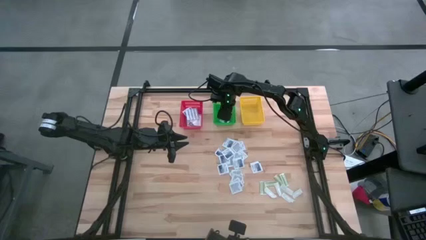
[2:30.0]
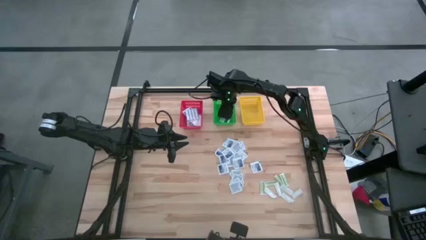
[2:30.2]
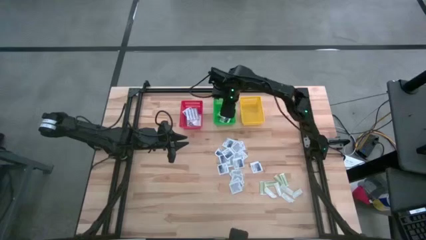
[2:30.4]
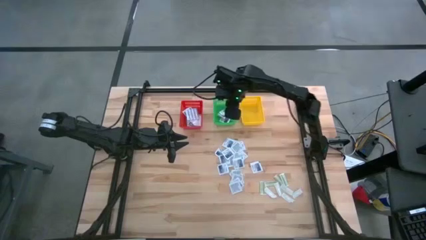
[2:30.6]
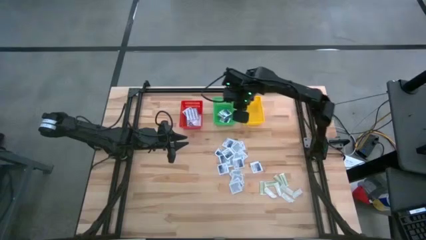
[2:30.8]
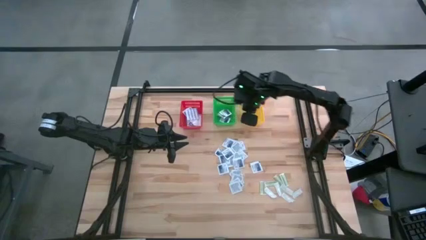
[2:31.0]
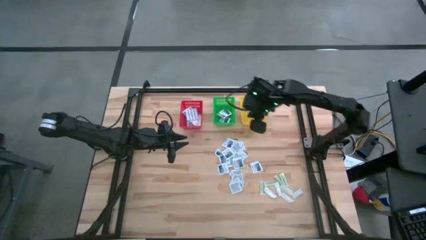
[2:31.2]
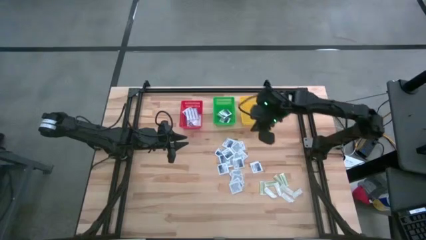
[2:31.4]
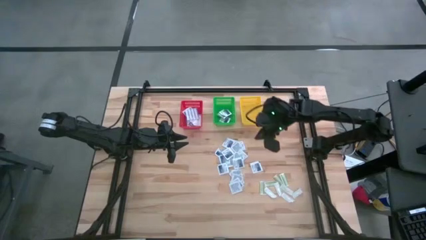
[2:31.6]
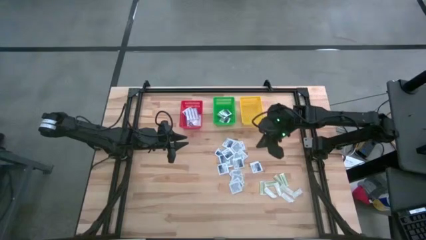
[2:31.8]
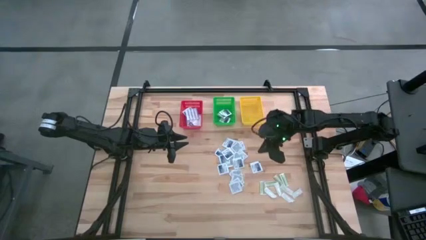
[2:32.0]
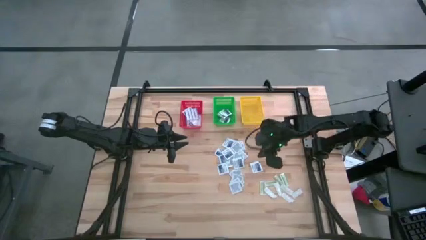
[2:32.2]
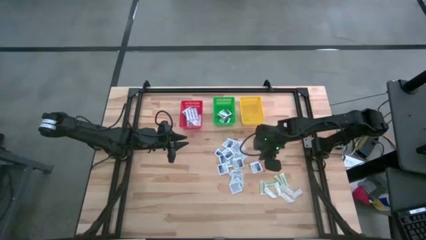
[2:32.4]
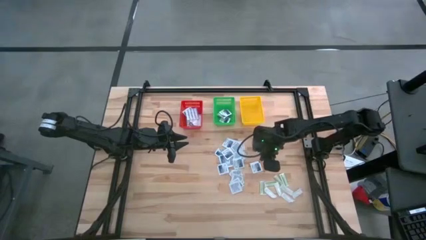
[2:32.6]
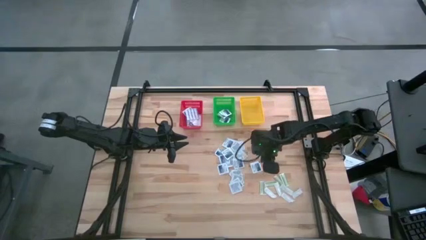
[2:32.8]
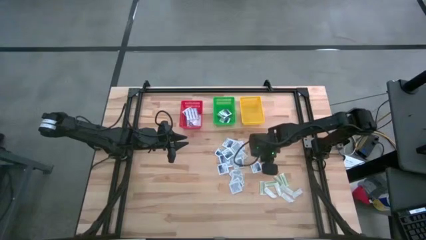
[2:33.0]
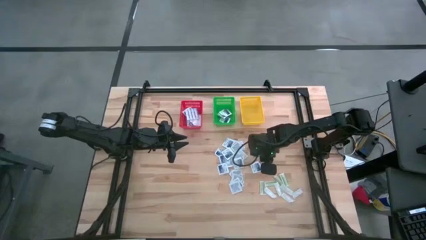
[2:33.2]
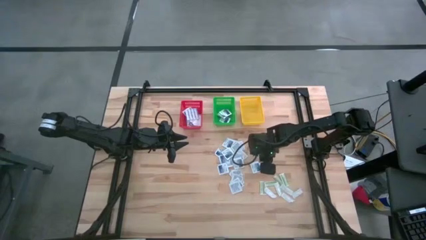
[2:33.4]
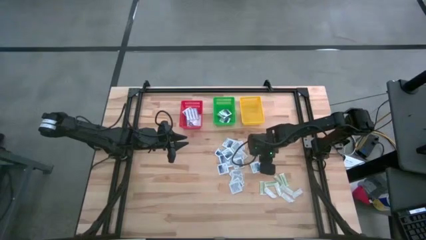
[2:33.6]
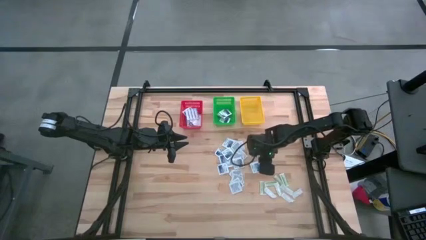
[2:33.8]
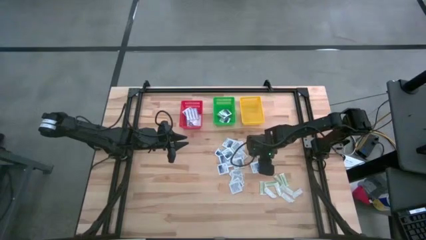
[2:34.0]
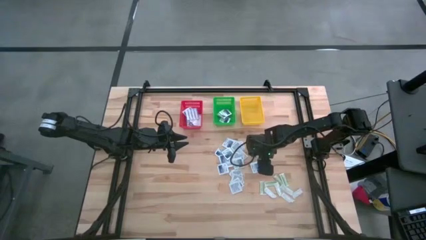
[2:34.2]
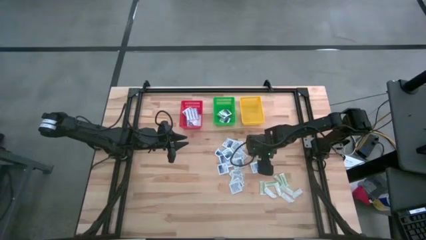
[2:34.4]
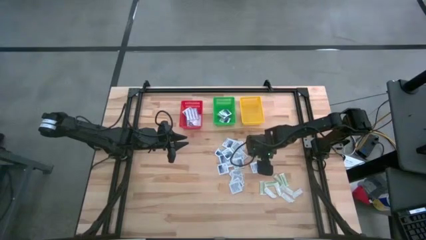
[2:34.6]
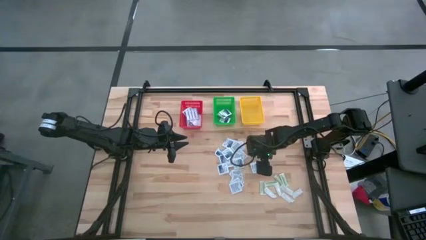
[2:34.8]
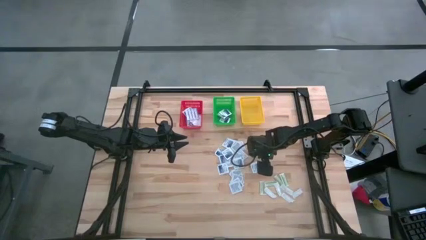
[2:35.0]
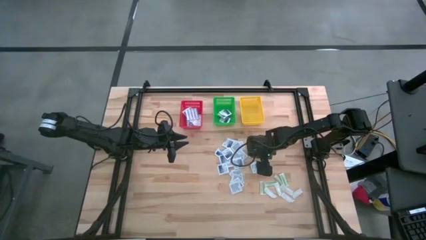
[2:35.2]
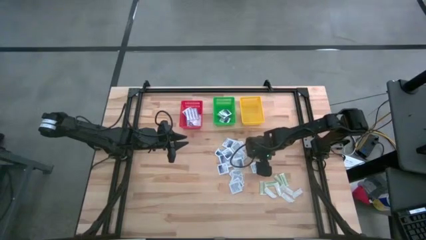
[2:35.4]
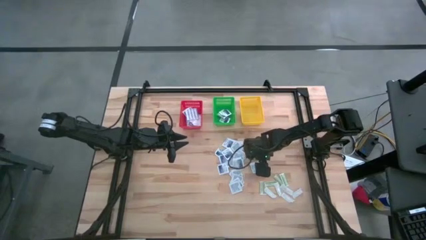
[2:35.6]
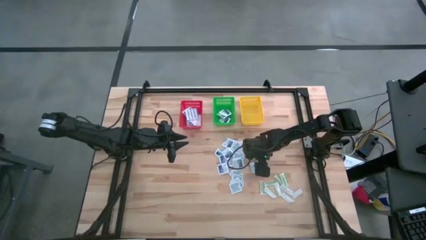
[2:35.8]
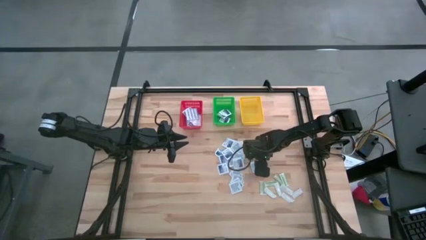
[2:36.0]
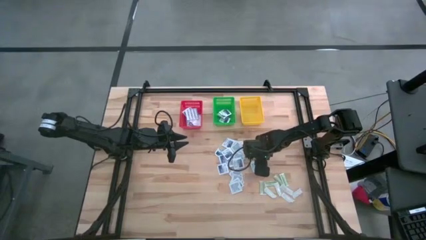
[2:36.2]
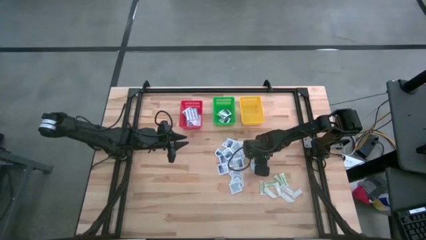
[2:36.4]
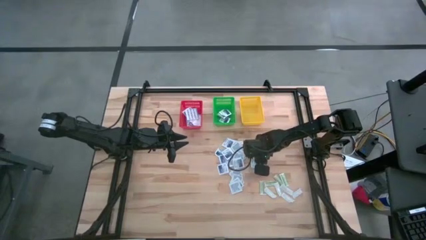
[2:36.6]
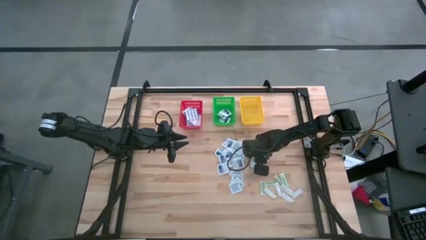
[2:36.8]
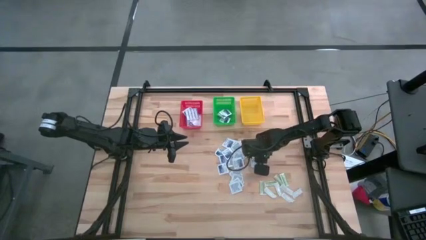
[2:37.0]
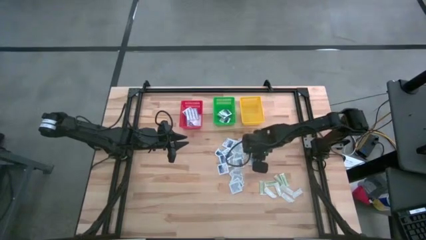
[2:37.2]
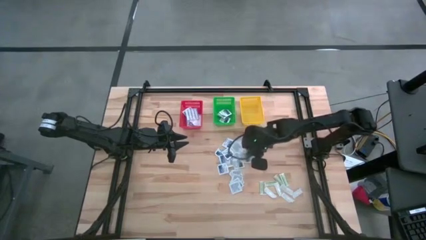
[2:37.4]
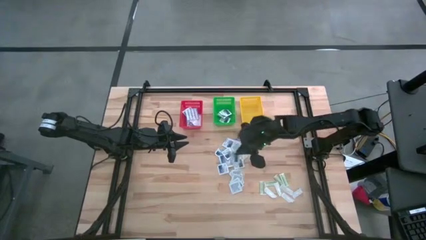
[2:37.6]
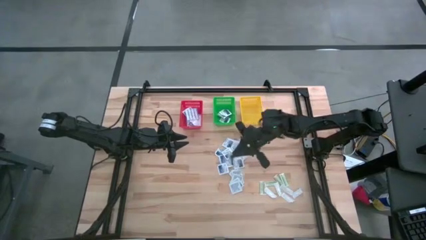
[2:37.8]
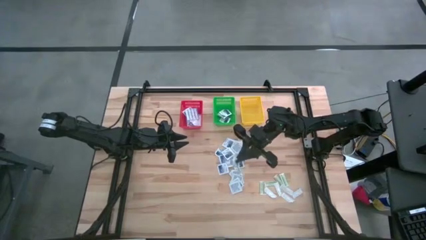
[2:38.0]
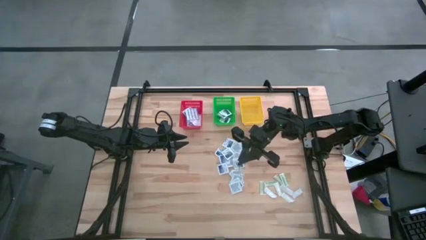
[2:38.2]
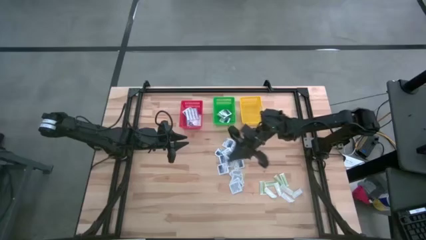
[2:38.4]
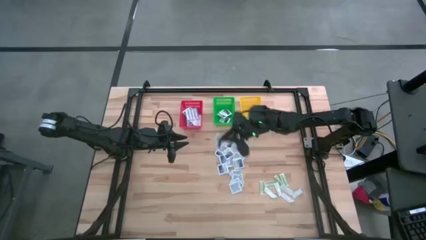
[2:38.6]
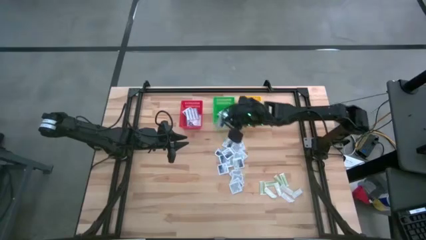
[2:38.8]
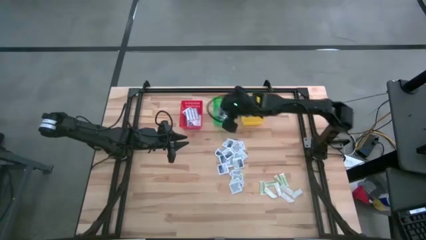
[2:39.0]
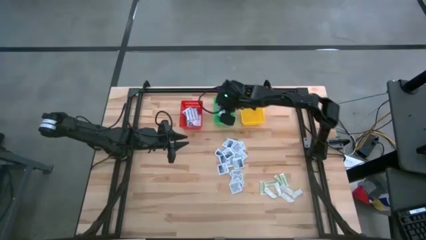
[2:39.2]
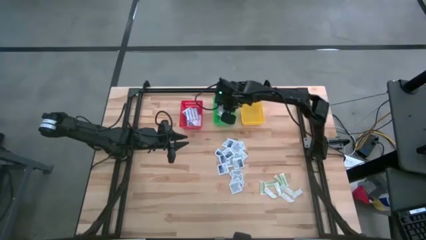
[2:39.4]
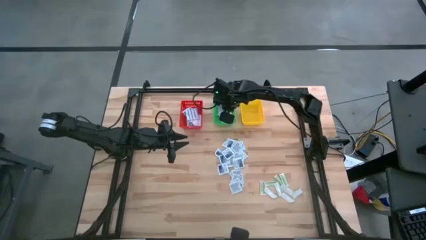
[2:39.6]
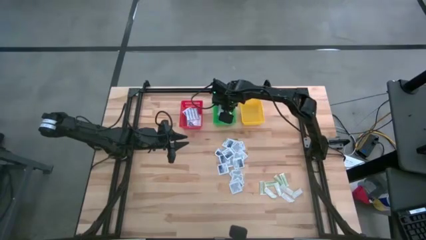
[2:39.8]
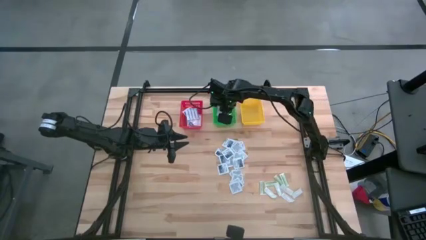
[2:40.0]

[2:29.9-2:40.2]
Task: Pick & Place First Aid Supplies
Put the alcohol pad into the green basket

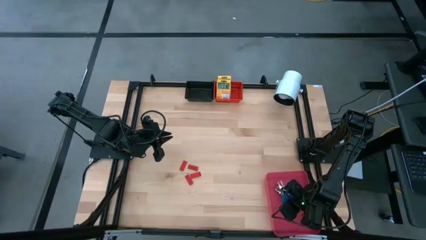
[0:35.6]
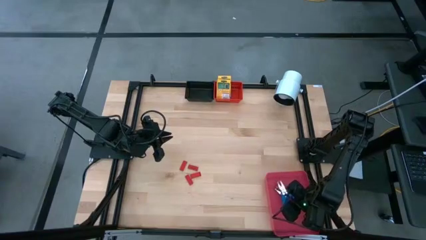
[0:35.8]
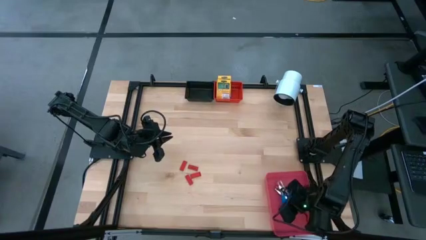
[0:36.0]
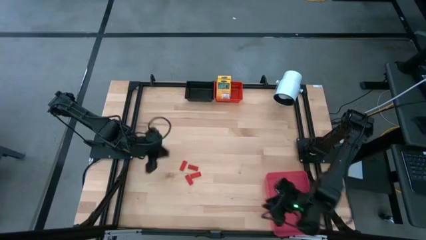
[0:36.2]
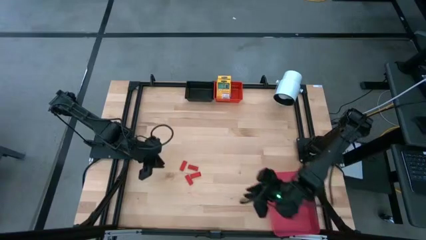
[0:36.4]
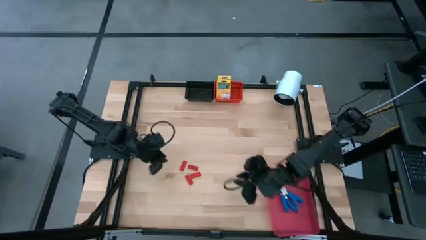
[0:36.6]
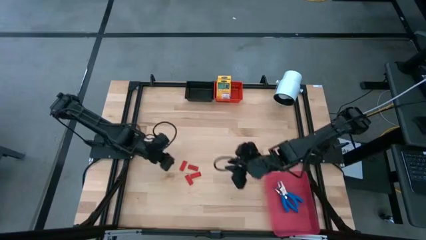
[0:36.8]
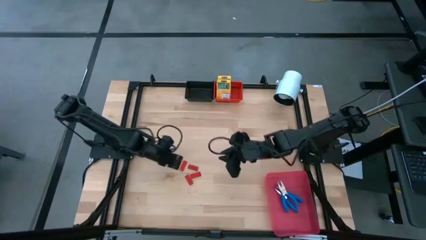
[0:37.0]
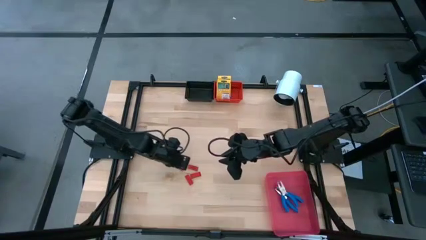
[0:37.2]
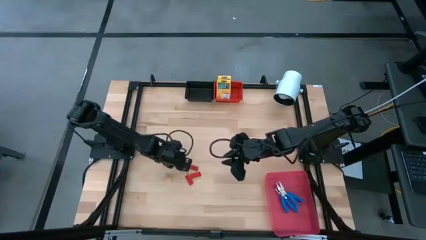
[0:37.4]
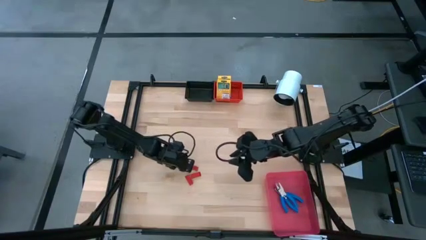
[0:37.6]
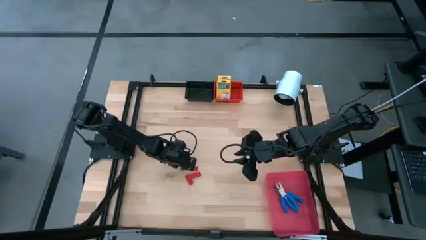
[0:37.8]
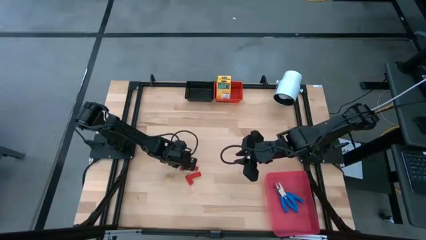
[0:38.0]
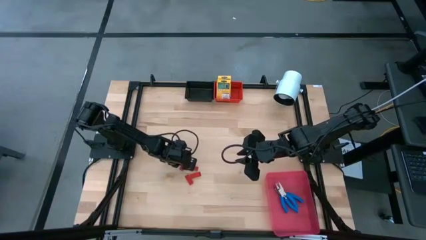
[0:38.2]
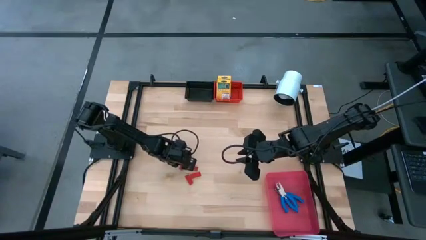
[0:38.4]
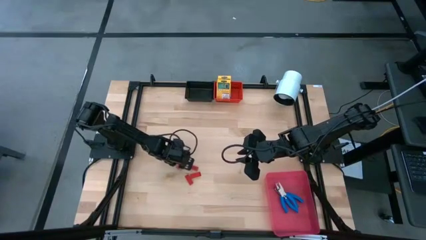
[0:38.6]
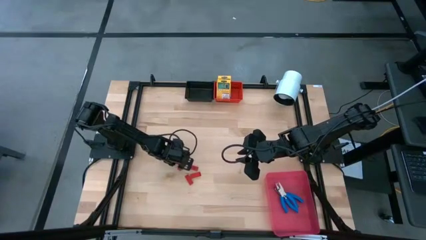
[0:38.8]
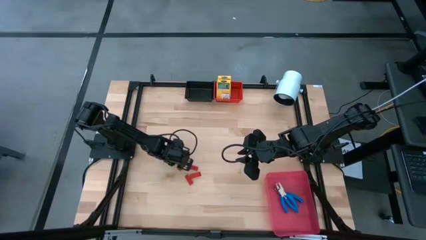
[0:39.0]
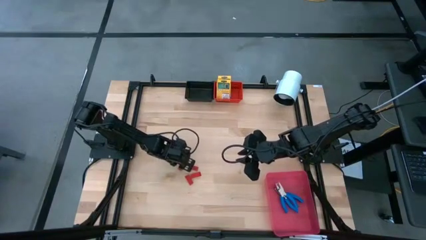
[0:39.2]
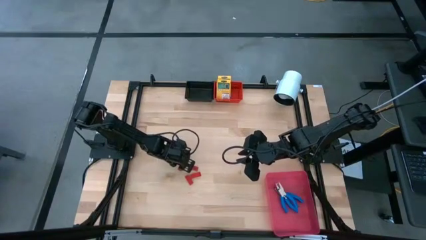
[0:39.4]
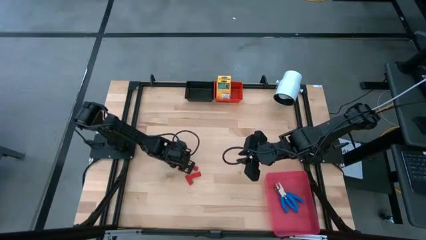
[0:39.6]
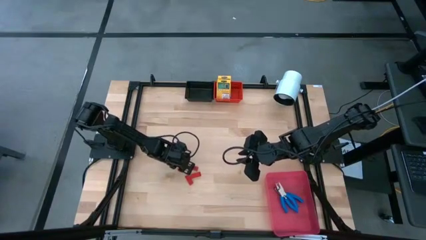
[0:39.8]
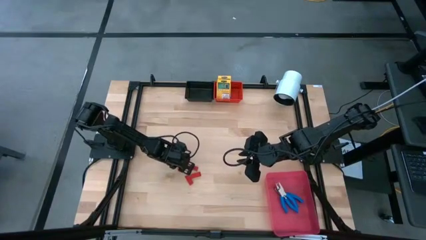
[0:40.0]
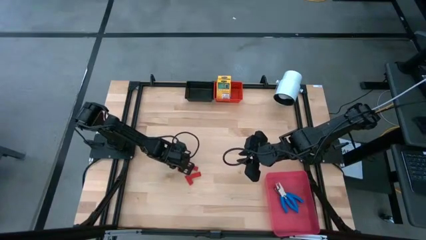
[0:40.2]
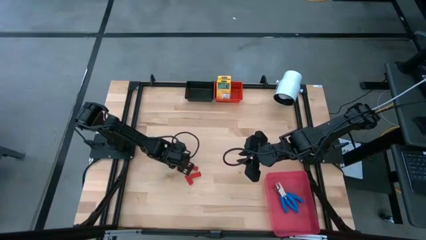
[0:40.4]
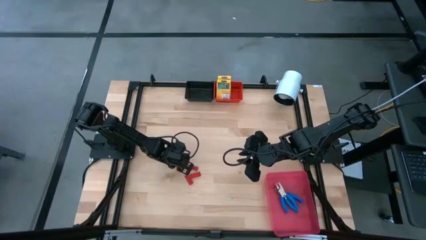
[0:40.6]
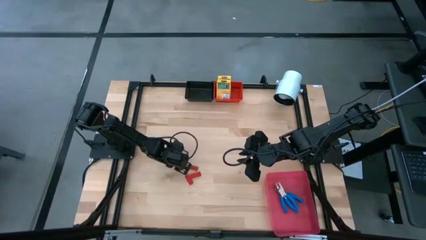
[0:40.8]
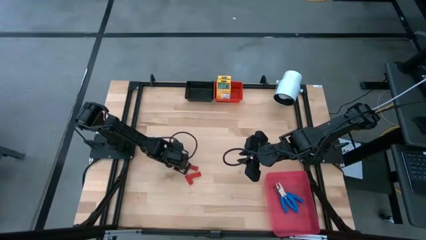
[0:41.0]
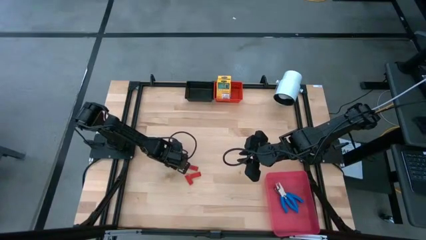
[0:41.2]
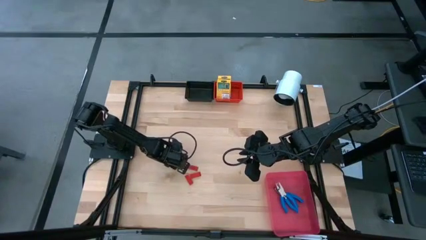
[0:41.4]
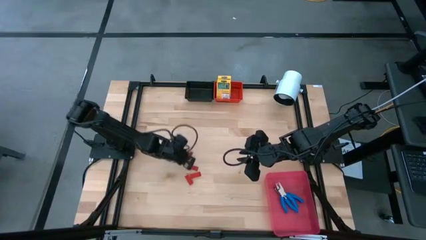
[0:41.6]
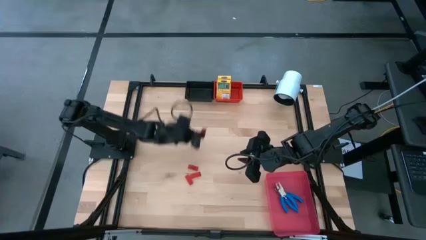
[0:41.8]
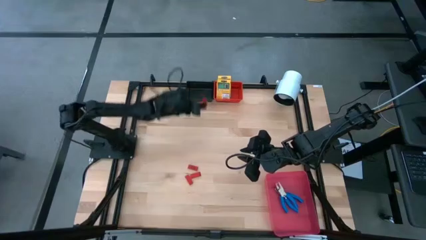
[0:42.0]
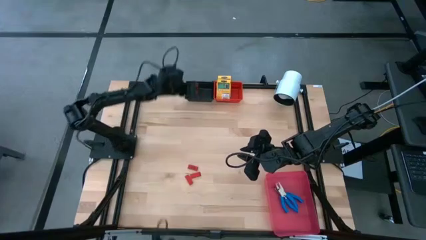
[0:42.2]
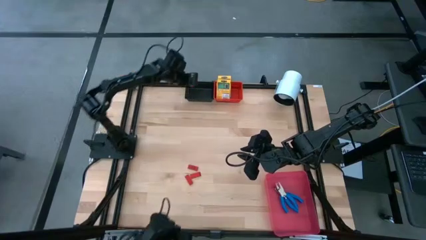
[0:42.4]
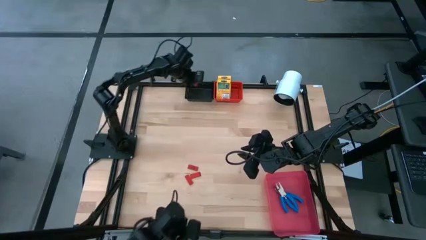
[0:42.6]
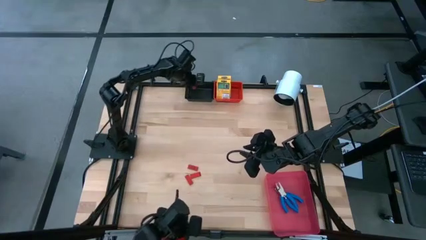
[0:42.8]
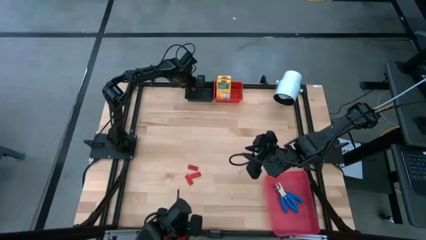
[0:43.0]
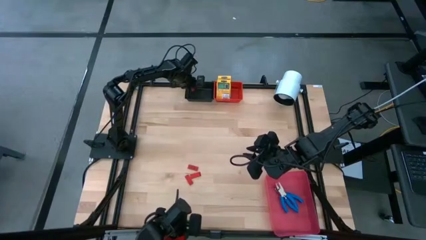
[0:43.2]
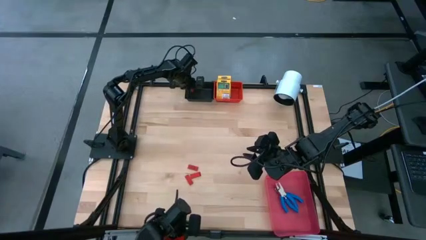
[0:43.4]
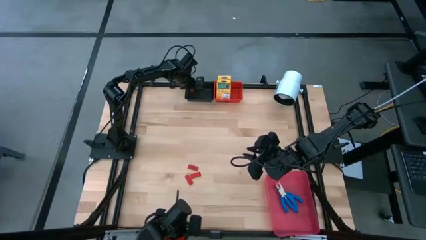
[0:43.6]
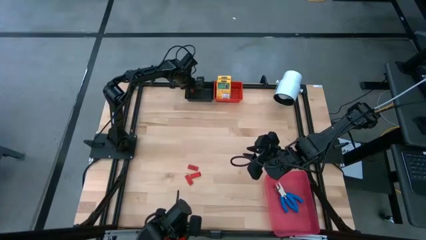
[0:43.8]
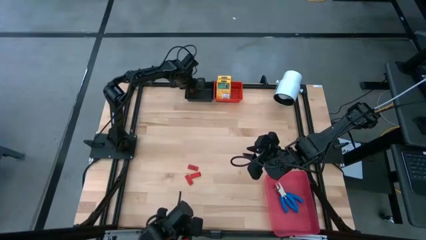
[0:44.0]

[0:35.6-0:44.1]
Task: Pick & Place School Supplies
Put the red eraser into the black bin
